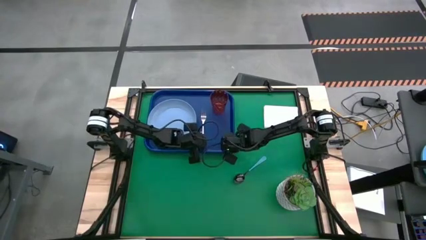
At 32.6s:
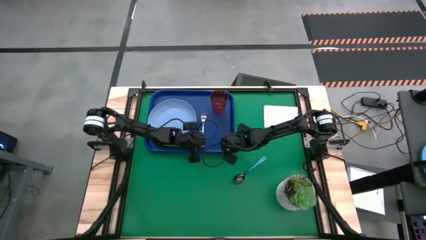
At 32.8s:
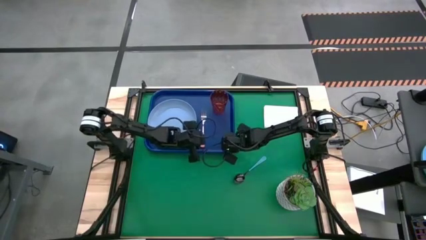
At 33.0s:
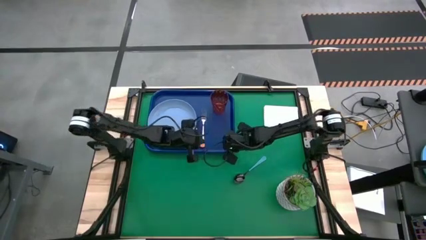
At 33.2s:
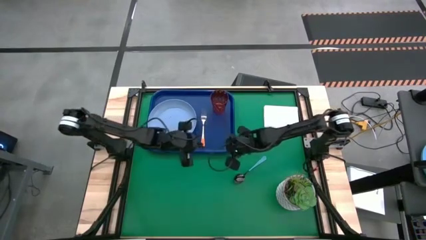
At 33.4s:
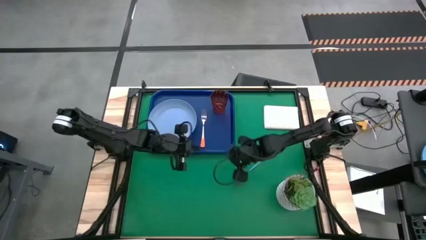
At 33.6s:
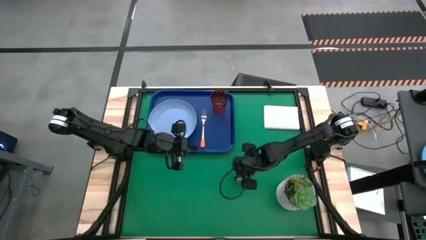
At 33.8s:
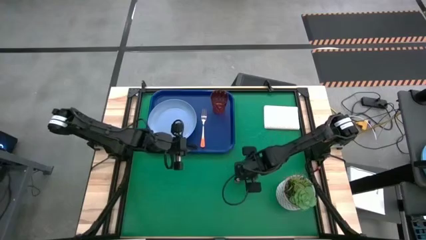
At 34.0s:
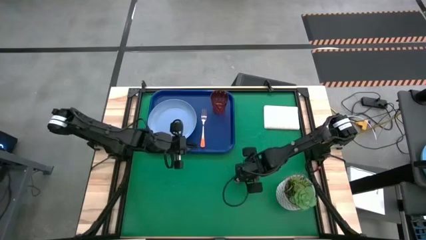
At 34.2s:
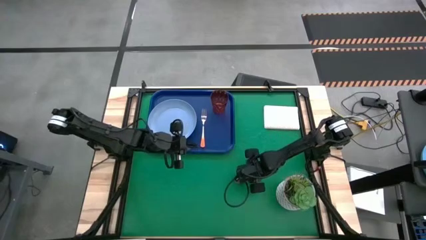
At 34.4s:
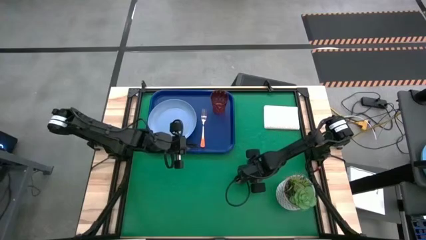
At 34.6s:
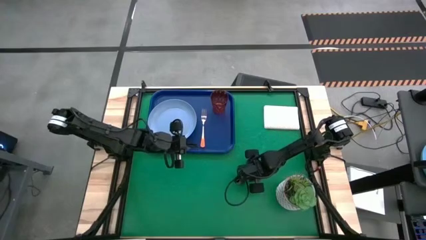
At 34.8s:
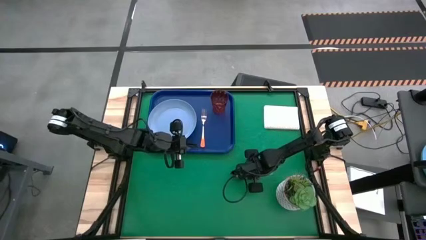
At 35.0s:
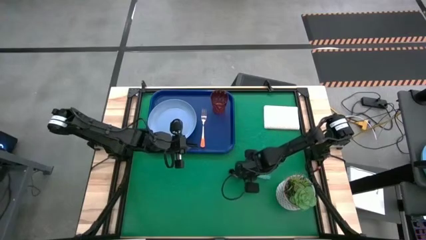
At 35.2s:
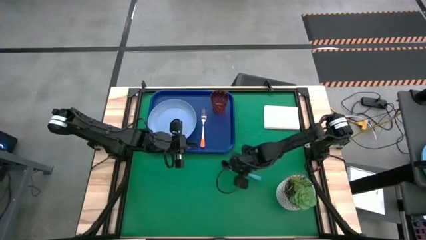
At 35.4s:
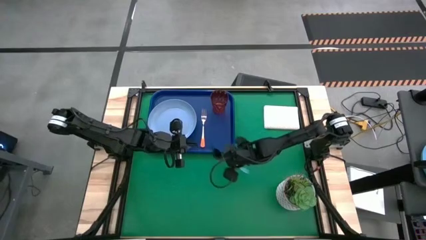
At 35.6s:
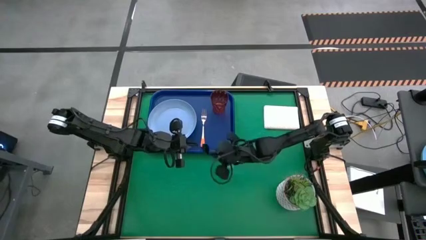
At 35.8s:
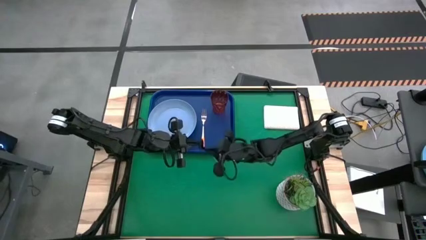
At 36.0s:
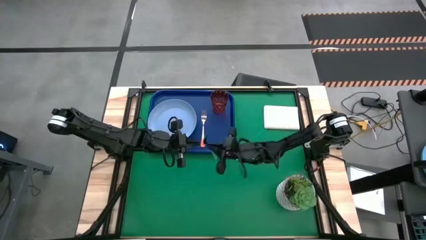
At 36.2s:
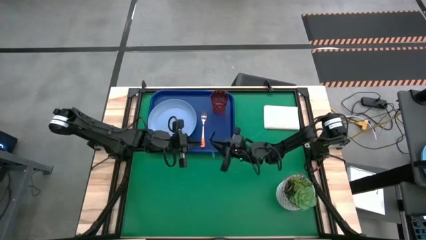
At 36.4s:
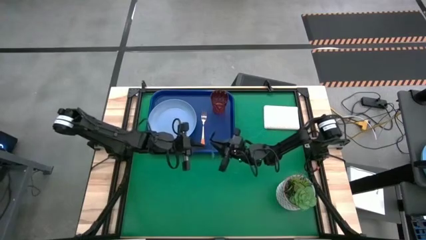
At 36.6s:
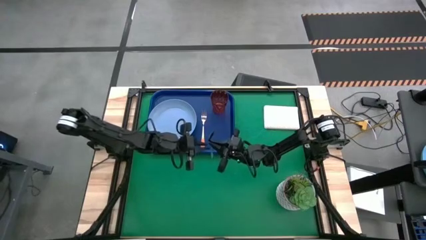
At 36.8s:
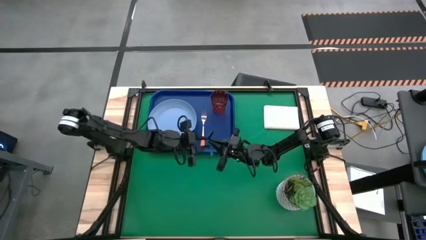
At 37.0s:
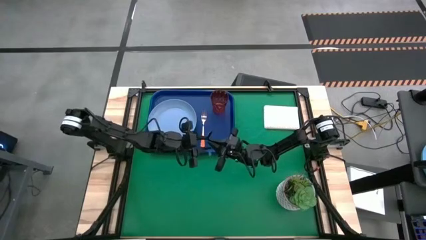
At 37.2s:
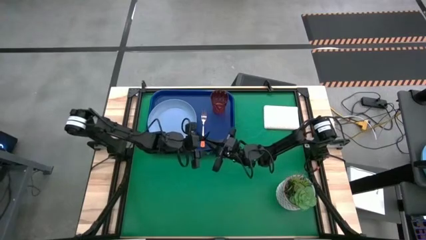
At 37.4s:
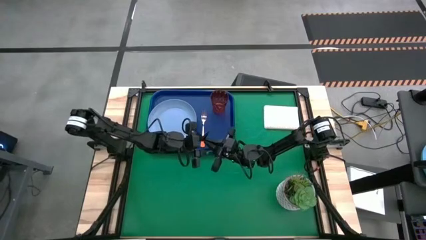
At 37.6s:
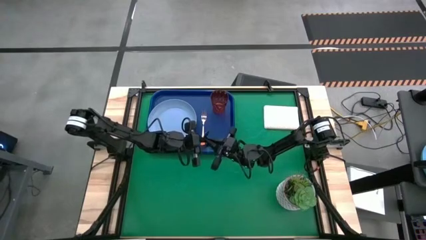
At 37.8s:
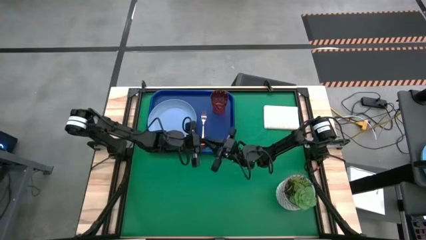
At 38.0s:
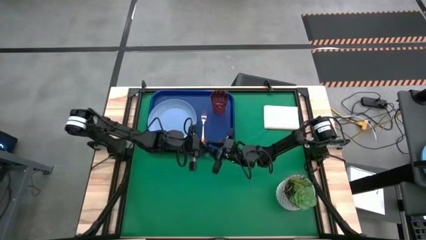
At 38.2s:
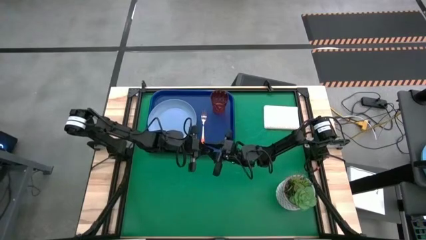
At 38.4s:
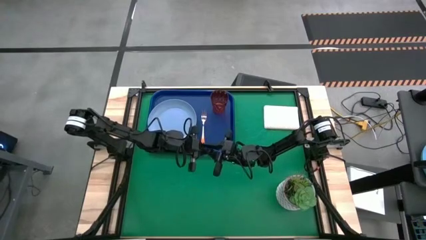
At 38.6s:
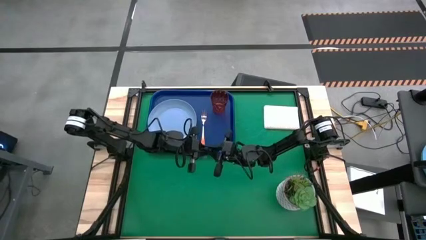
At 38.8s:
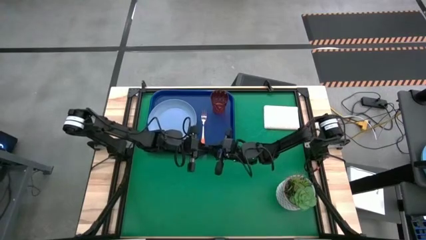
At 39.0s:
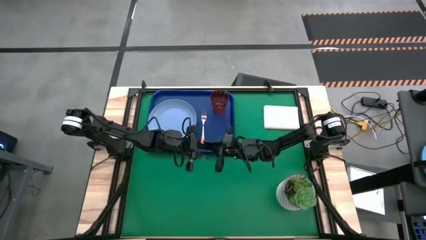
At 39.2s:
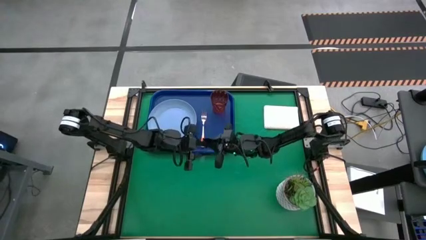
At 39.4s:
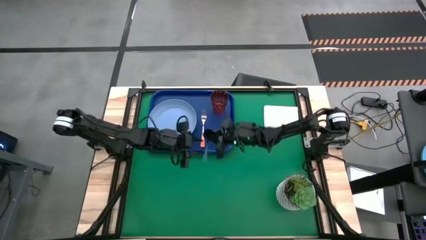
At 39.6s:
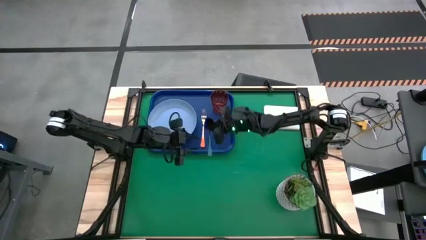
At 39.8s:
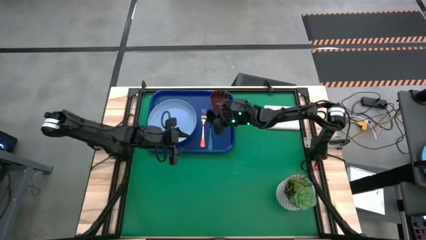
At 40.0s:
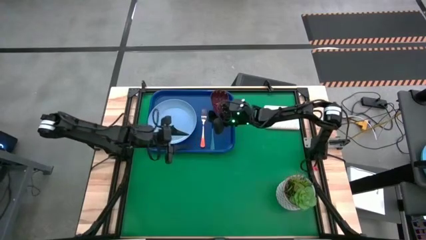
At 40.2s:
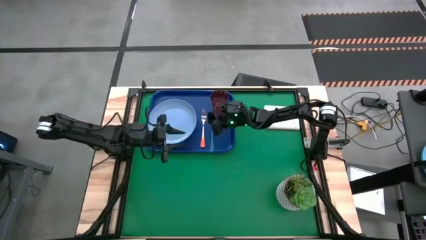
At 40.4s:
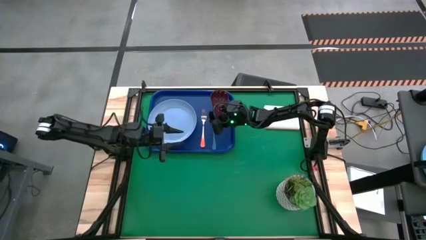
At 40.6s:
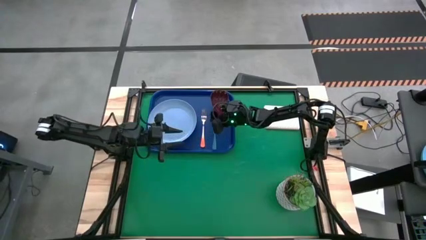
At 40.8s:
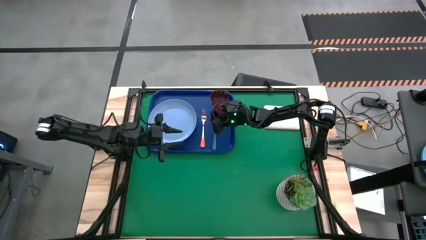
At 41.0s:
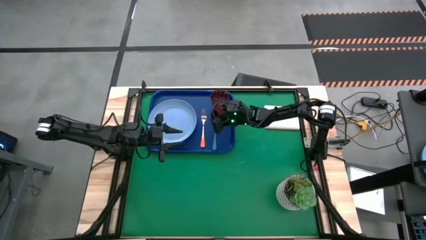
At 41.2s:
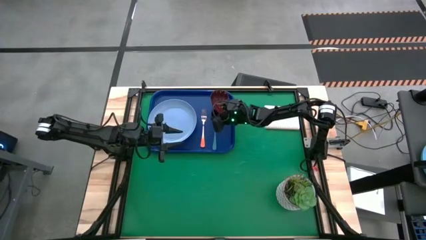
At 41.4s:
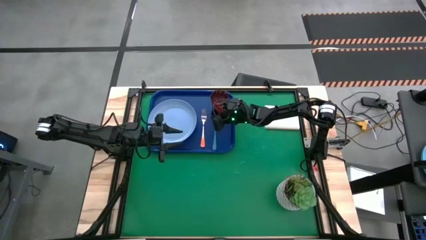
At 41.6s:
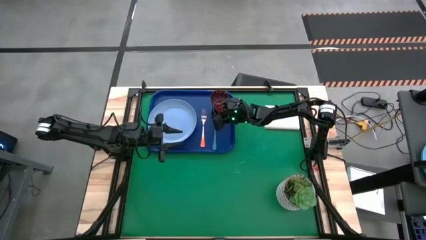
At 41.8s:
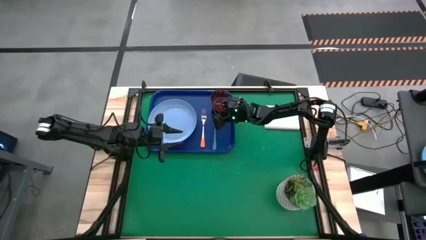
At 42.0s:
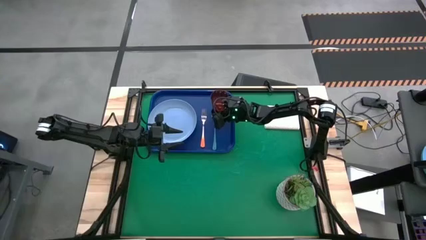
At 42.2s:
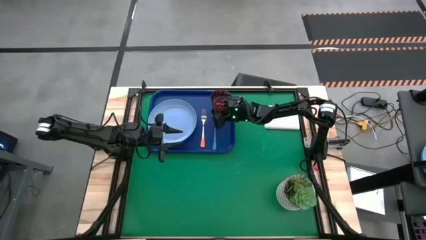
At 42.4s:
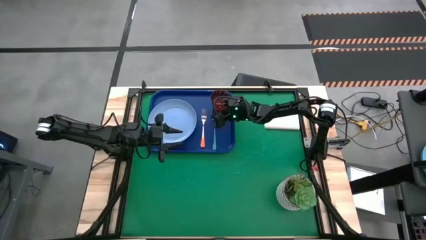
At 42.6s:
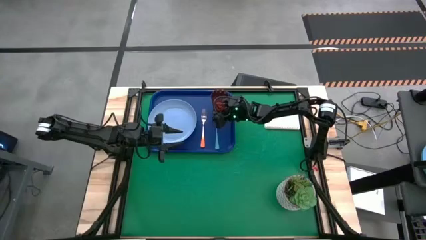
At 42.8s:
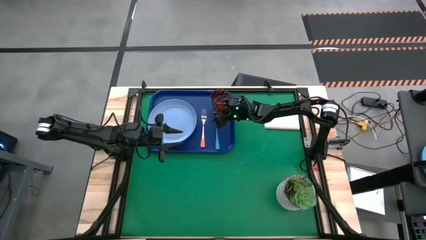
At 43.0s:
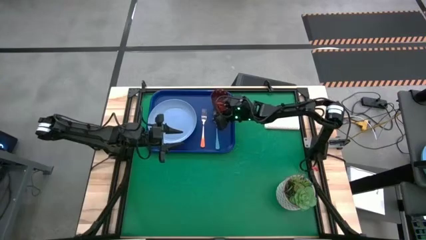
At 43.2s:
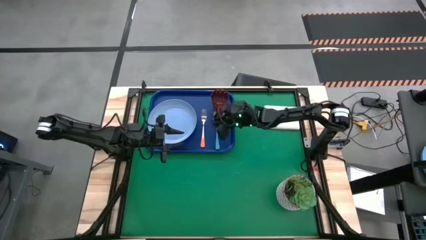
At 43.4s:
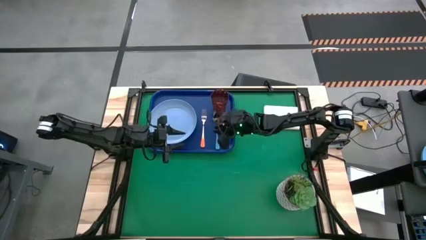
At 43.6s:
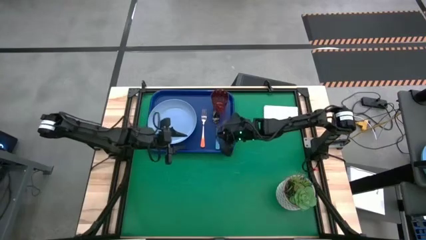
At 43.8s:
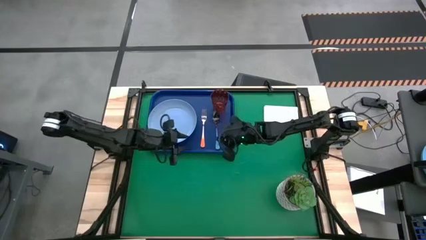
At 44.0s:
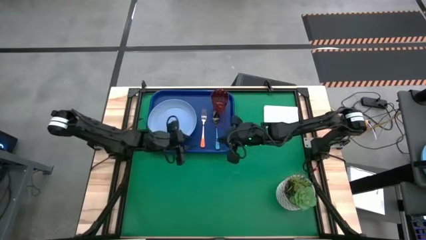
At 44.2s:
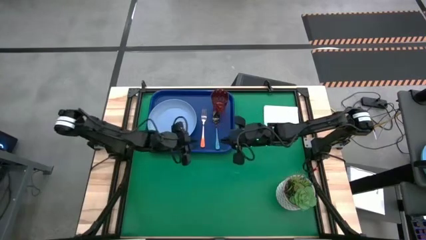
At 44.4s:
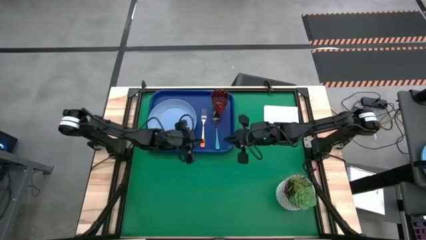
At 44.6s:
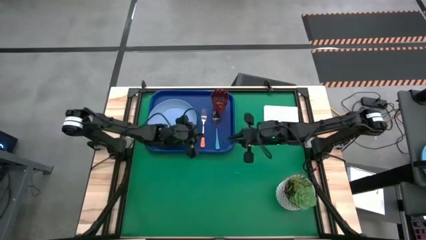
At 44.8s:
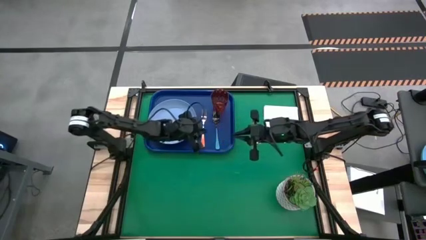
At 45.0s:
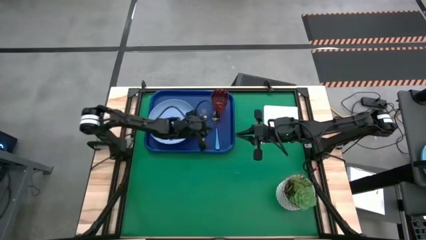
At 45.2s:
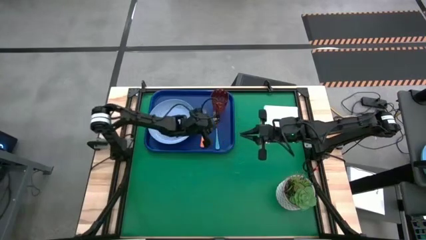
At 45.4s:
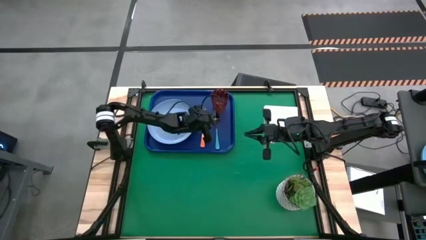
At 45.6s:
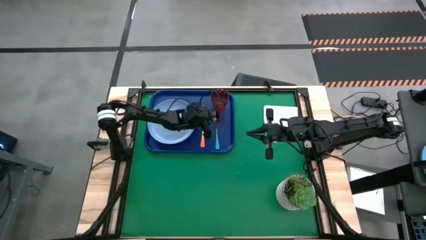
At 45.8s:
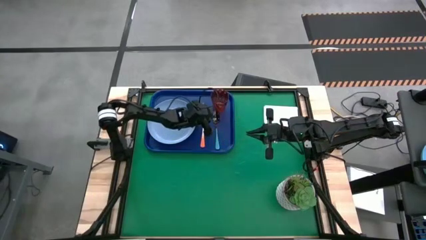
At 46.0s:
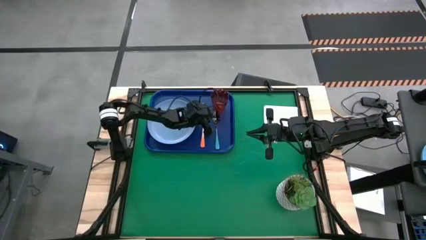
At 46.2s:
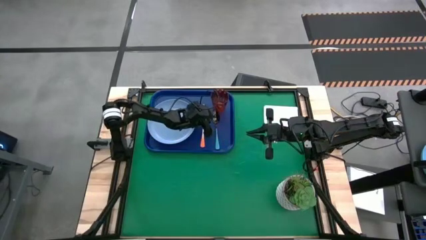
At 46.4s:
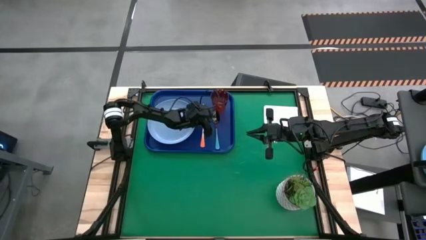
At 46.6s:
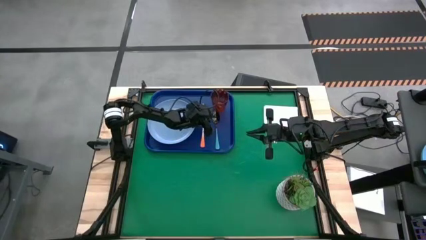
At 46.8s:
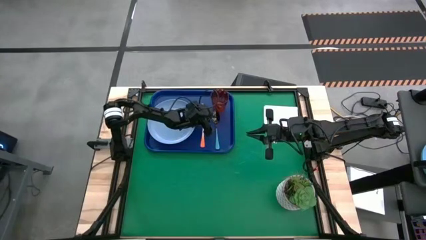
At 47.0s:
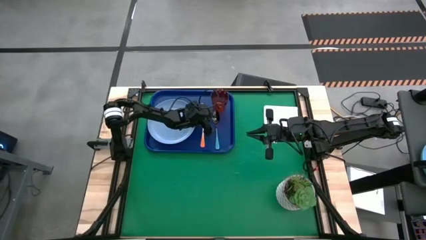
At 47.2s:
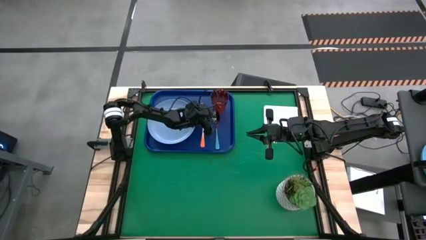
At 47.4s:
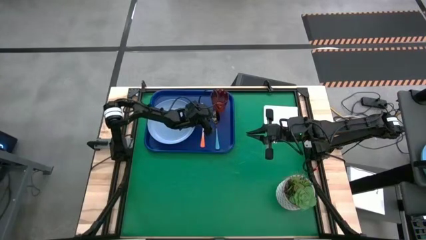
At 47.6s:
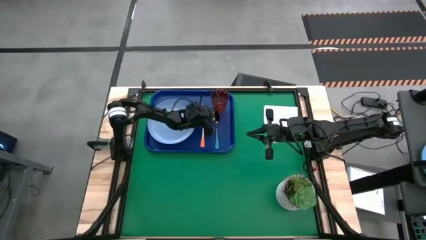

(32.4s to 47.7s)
Task: Pick and place plate/cup/fork/spoon on tray
Put the blue spoon on the blue serving tray to the right of the orange fork
